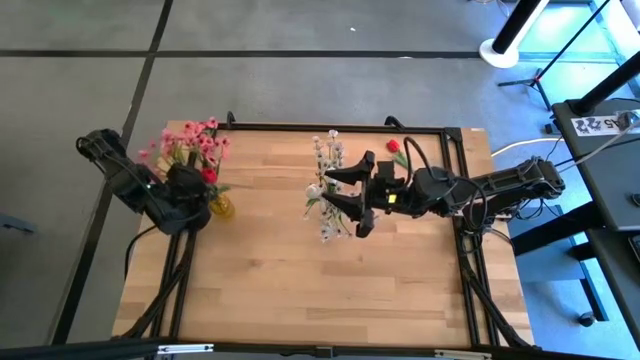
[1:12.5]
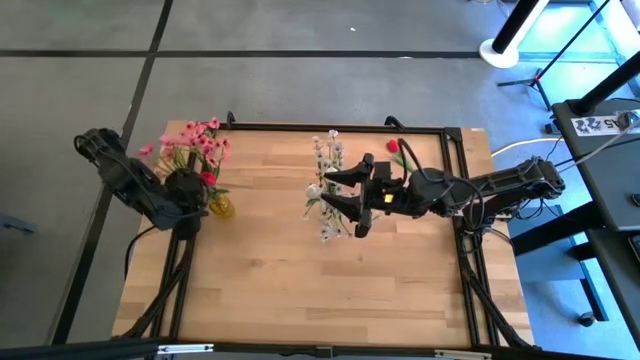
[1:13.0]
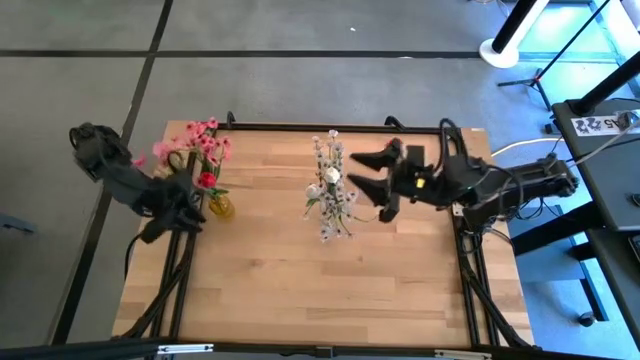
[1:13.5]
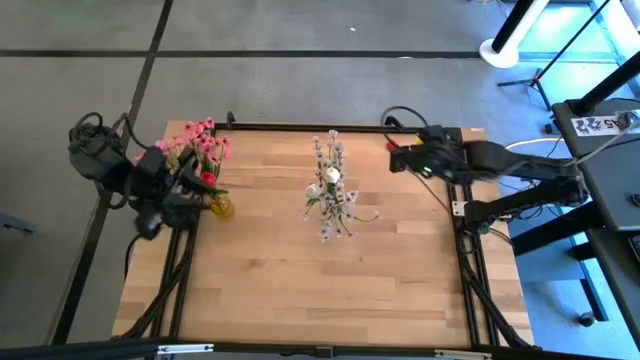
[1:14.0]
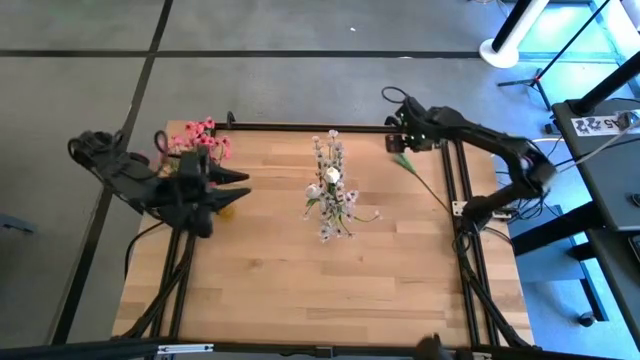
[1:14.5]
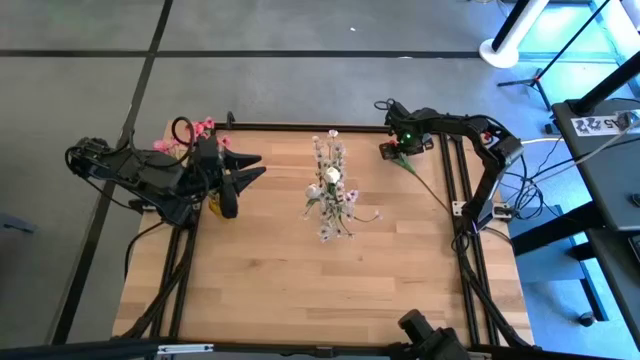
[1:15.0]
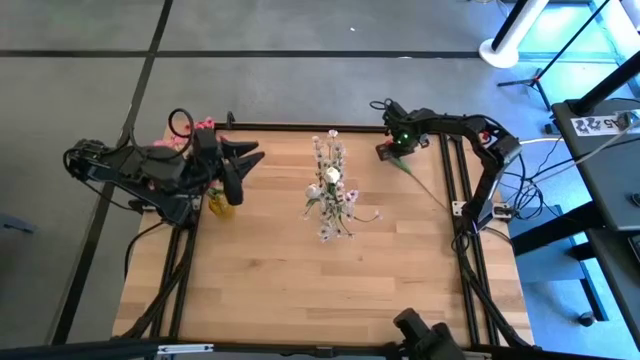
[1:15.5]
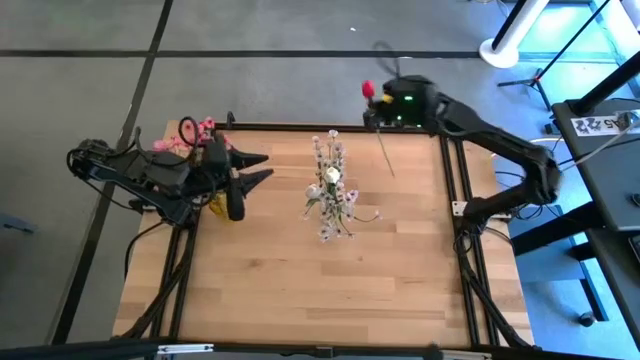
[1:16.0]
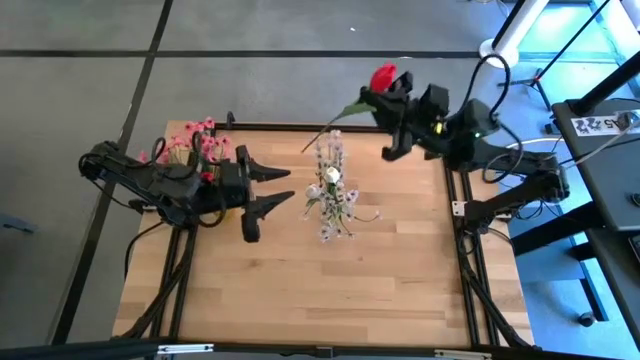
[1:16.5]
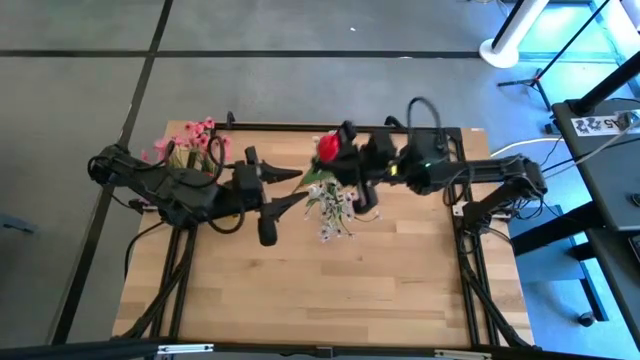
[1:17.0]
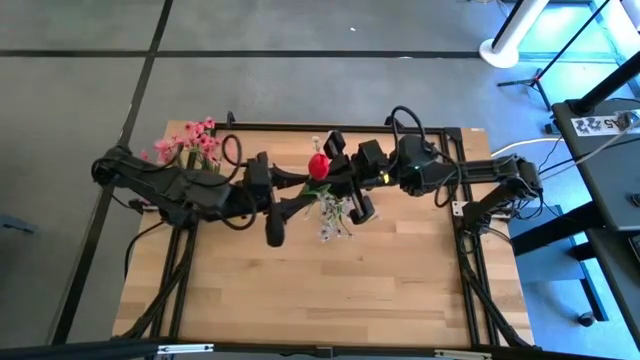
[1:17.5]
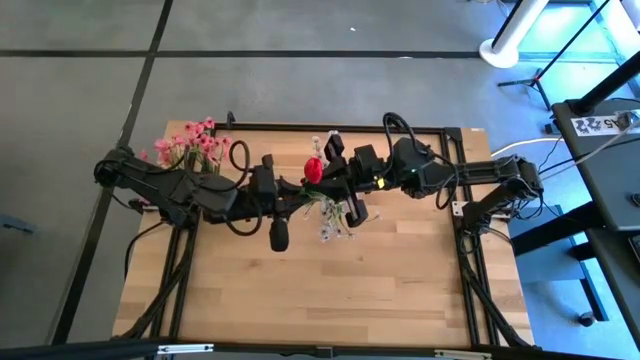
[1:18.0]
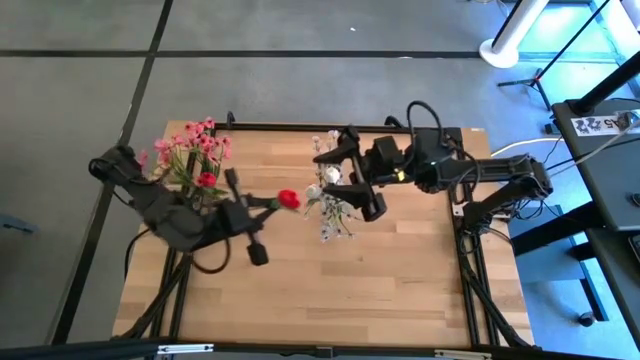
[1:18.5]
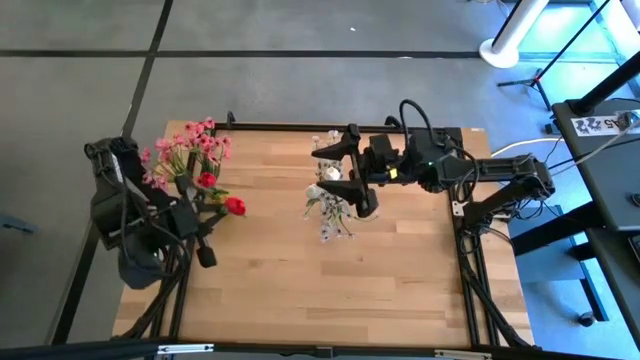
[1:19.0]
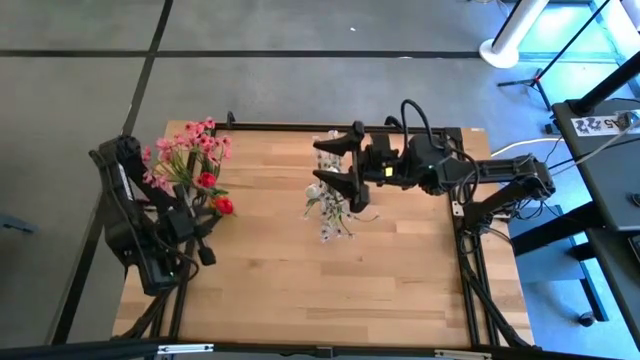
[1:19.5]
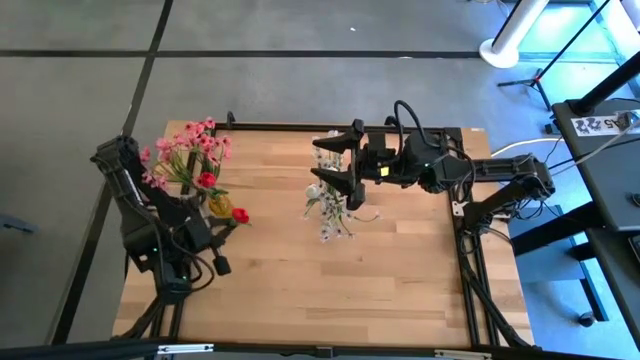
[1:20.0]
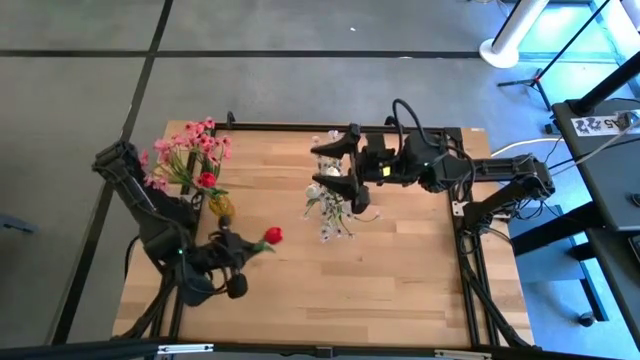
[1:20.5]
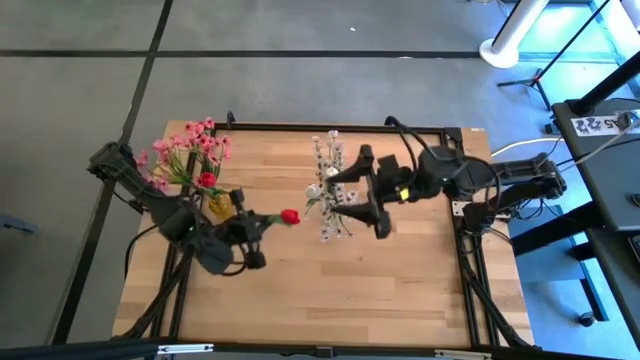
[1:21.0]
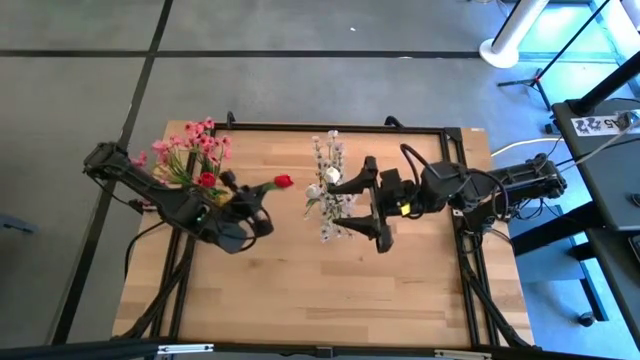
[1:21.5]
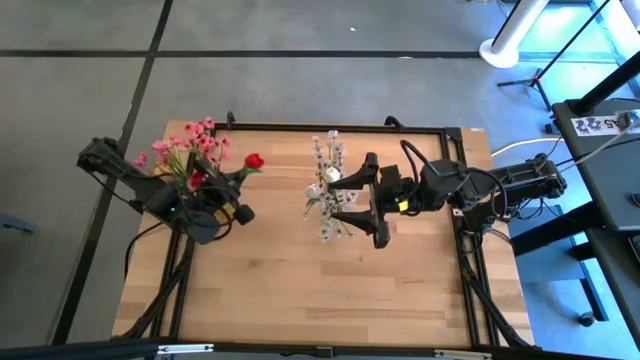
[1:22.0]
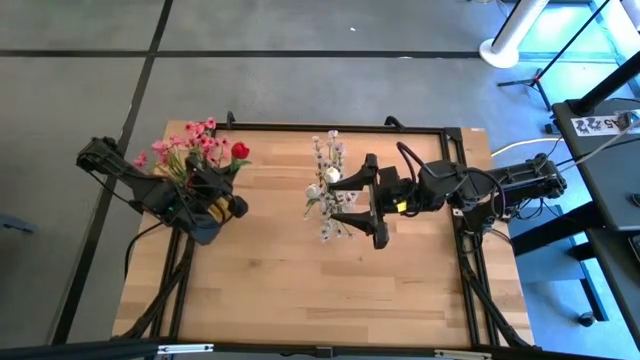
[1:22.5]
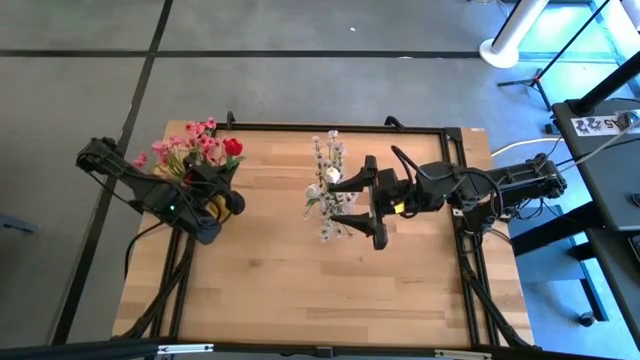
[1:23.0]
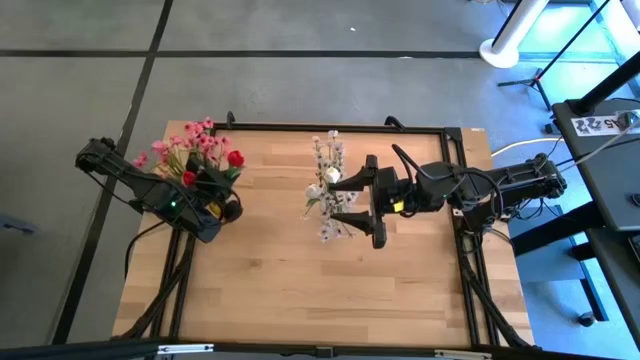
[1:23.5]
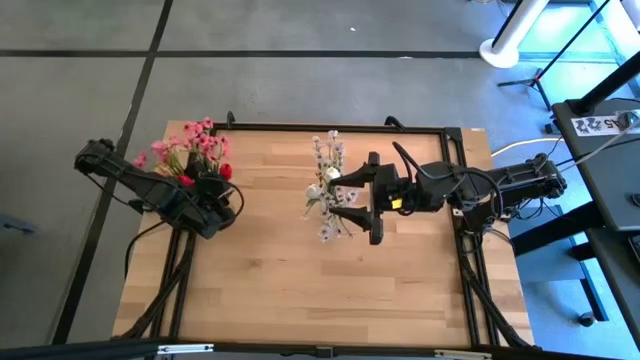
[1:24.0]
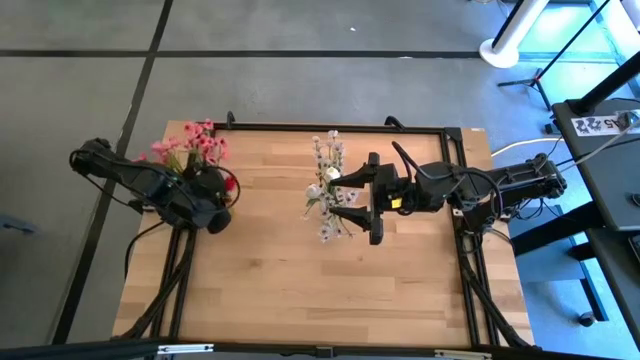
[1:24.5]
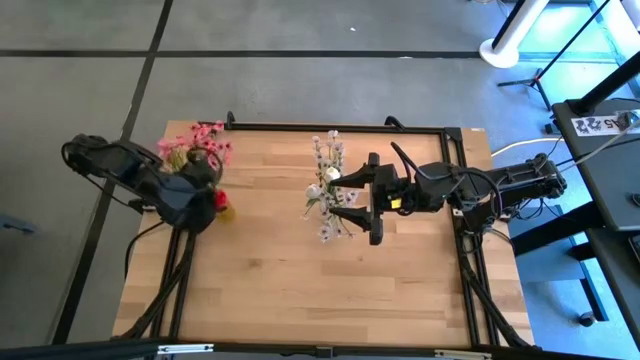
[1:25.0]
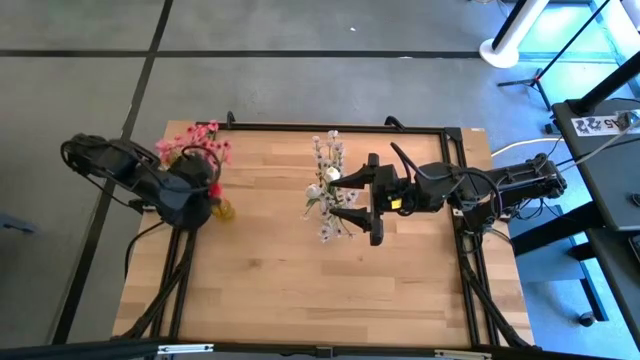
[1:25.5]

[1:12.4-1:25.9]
Task: Sort flowers into vase by color
Put the red tulip into the yellow vase

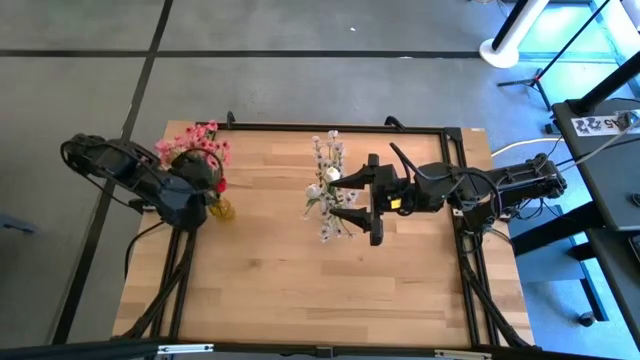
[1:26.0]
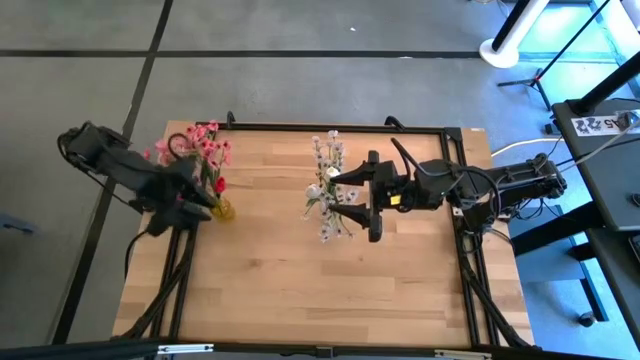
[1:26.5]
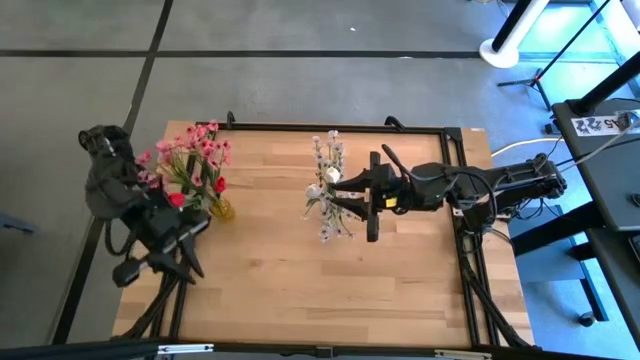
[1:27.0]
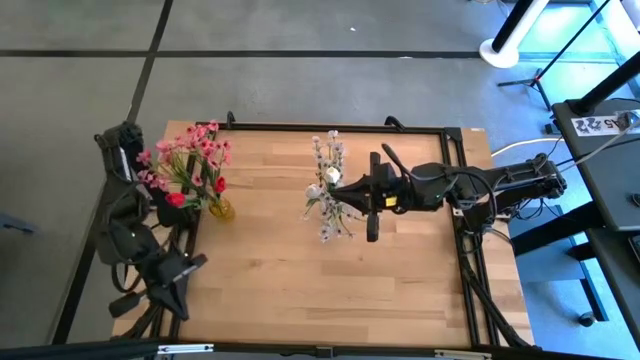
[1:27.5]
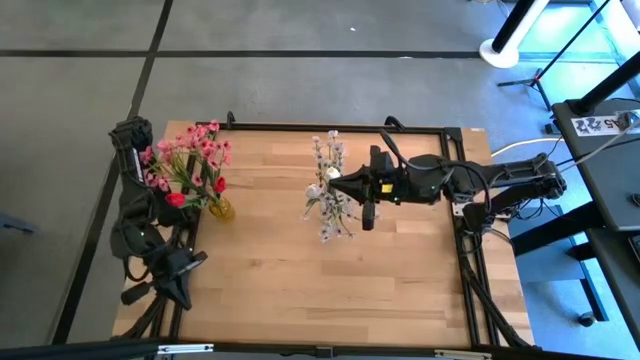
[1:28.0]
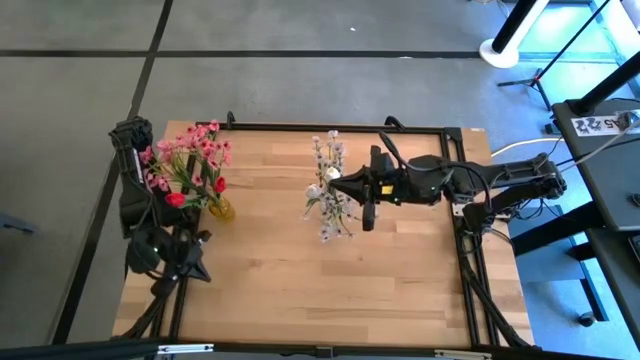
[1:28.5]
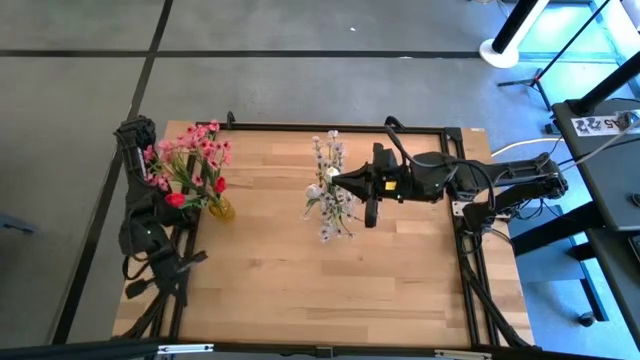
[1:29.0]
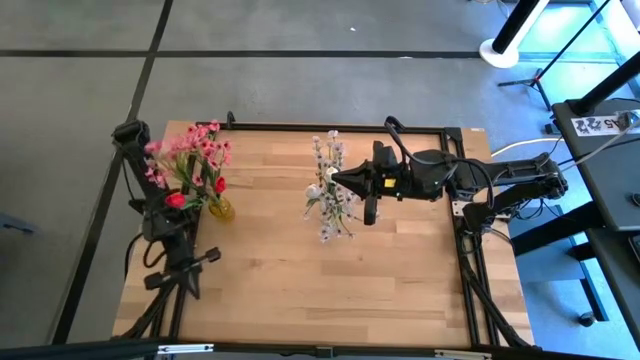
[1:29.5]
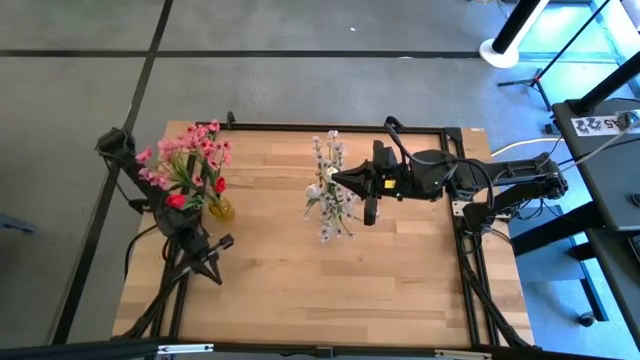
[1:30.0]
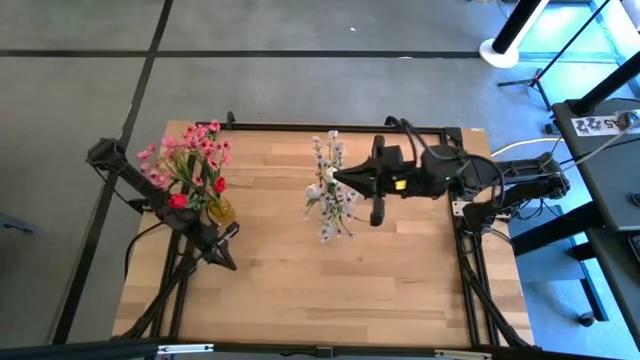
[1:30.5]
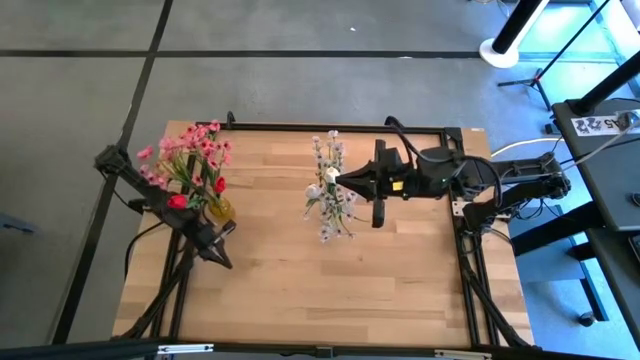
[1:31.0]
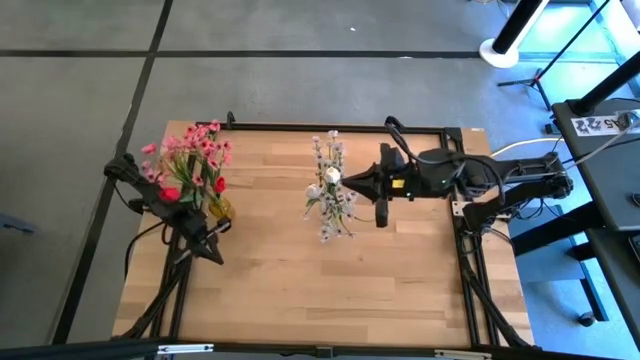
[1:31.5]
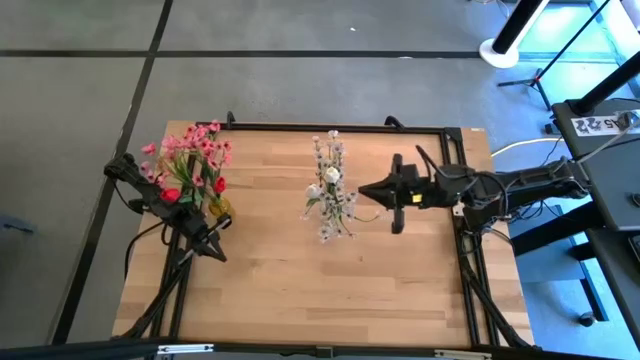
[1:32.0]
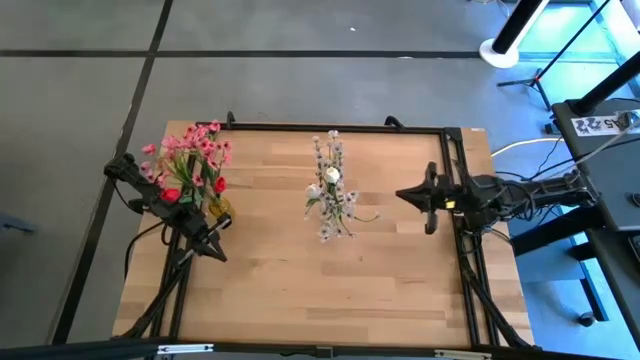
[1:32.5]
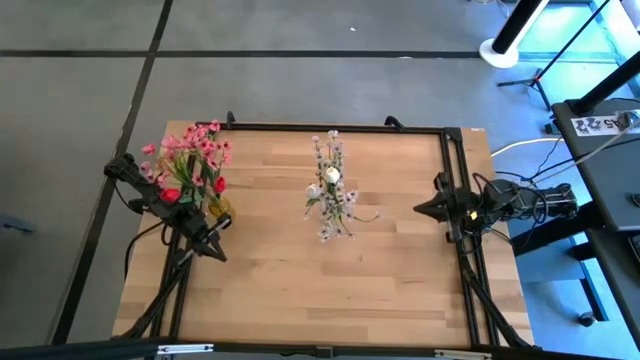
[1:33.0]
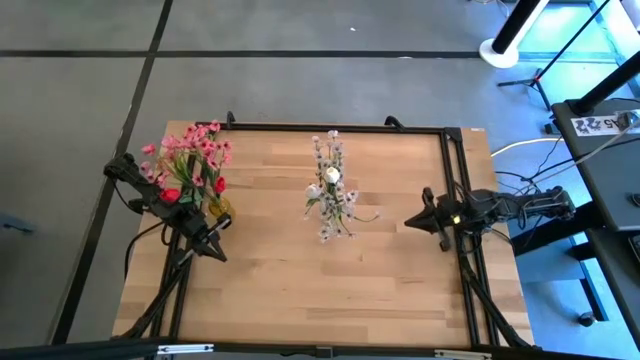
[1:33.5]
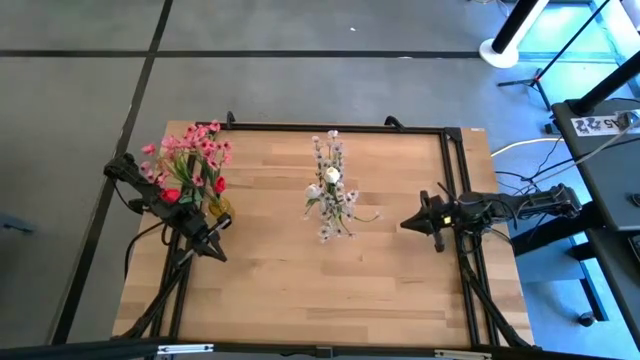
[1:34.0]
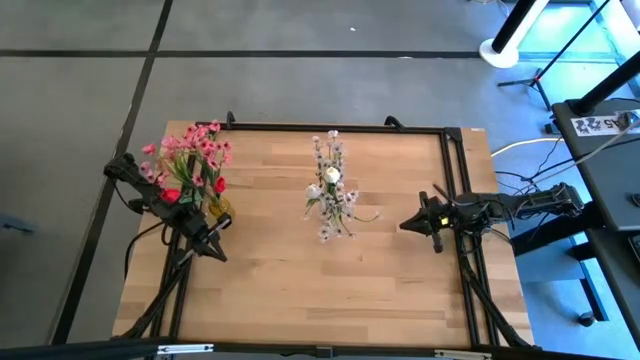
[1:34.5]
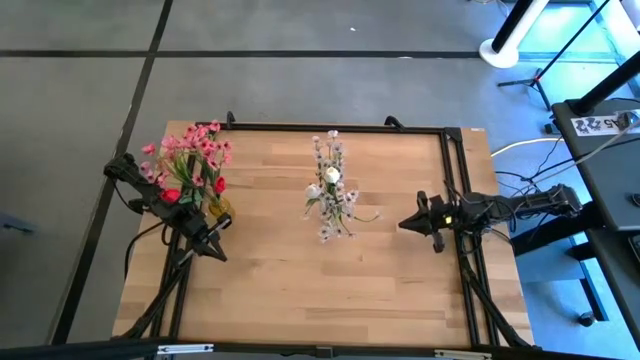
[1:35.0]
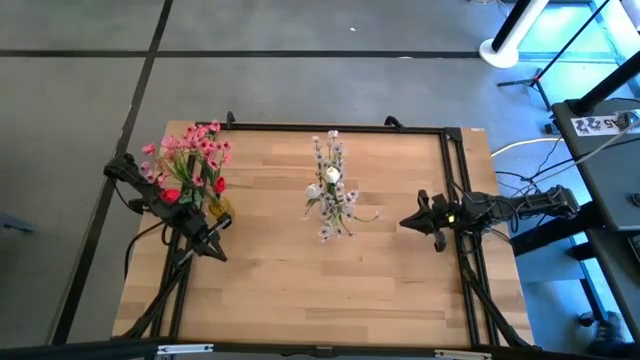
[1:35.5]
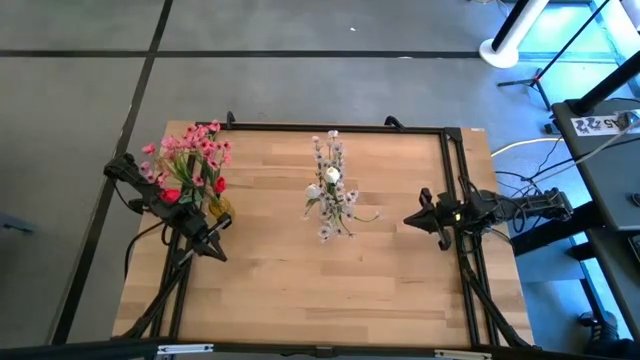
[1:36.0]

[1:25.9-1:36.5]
Return to Home Position
